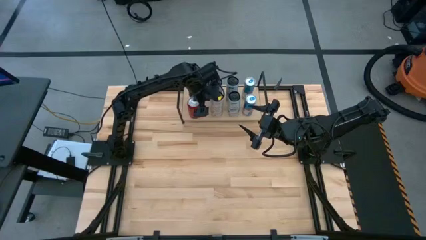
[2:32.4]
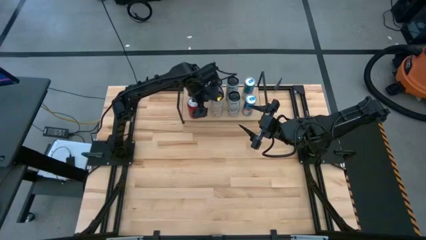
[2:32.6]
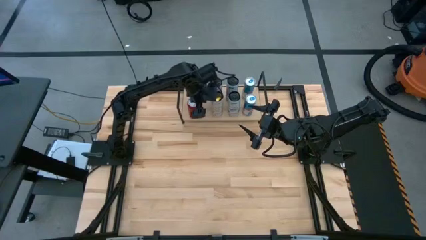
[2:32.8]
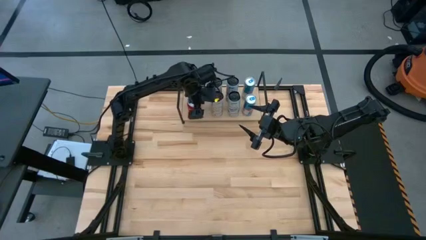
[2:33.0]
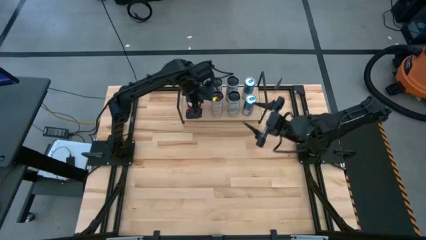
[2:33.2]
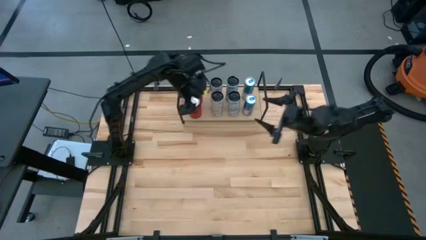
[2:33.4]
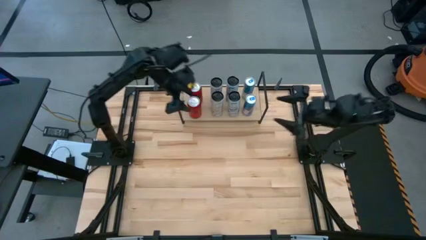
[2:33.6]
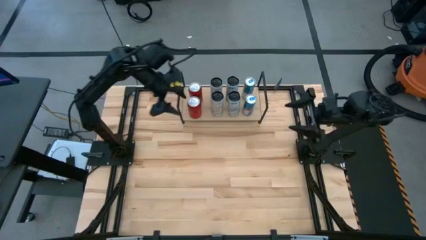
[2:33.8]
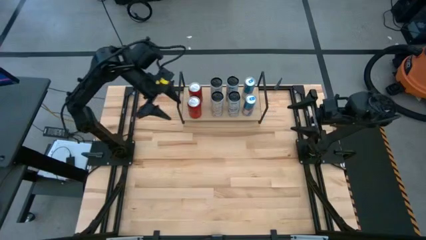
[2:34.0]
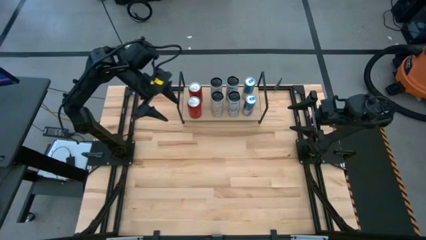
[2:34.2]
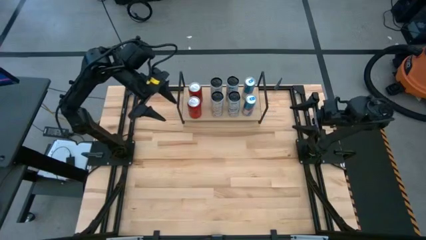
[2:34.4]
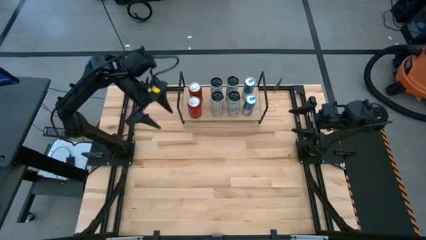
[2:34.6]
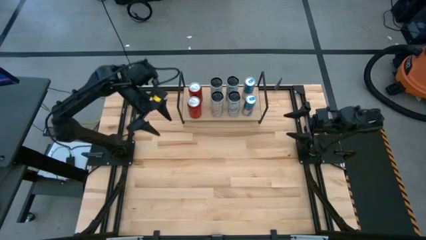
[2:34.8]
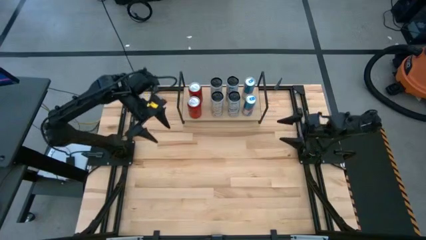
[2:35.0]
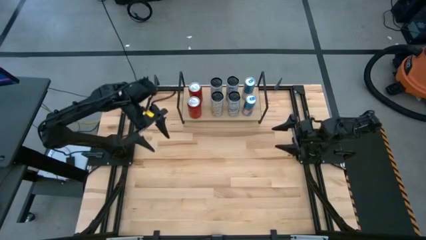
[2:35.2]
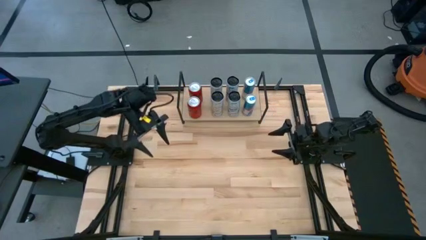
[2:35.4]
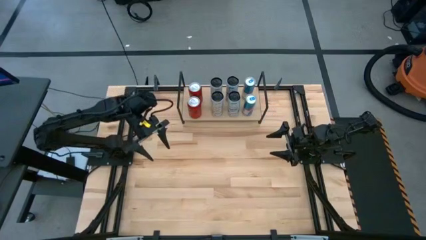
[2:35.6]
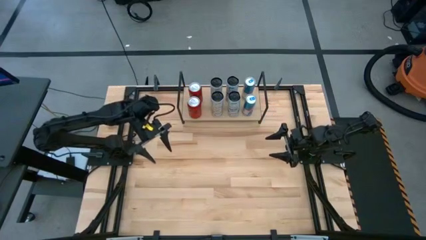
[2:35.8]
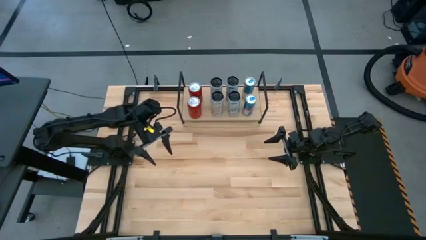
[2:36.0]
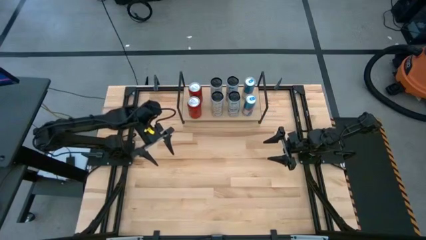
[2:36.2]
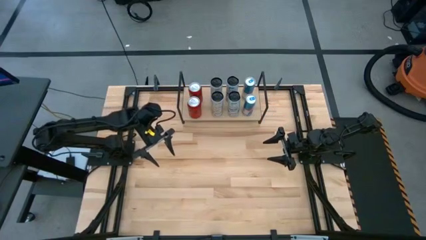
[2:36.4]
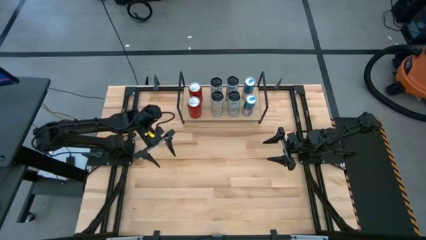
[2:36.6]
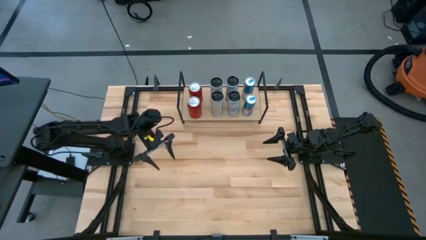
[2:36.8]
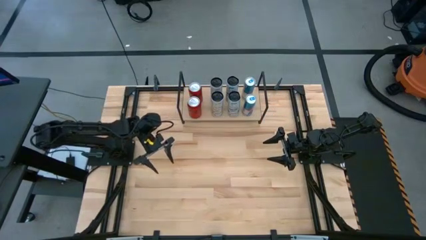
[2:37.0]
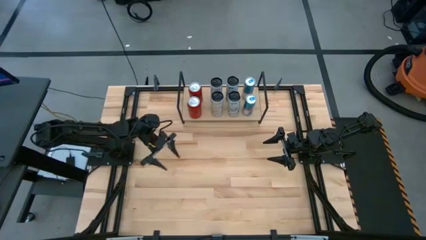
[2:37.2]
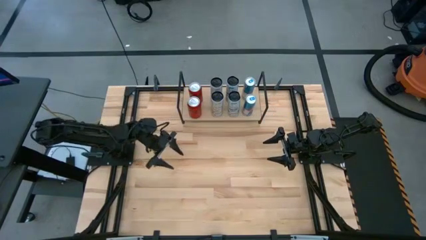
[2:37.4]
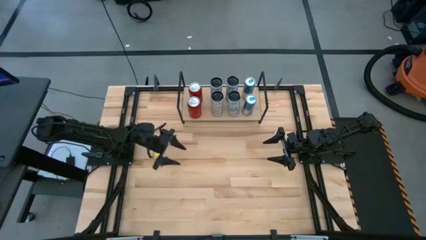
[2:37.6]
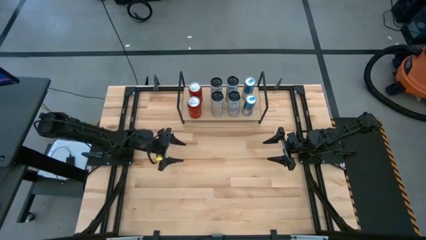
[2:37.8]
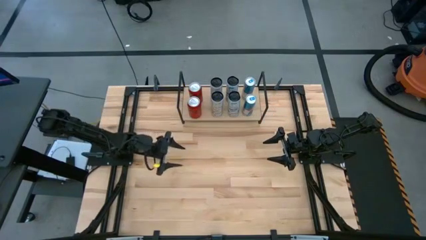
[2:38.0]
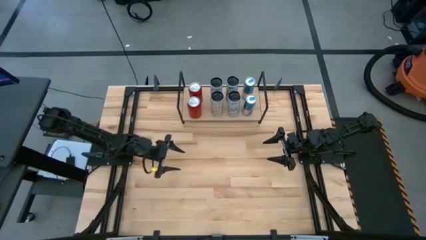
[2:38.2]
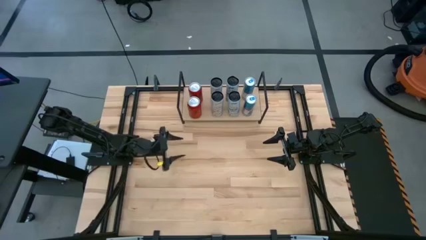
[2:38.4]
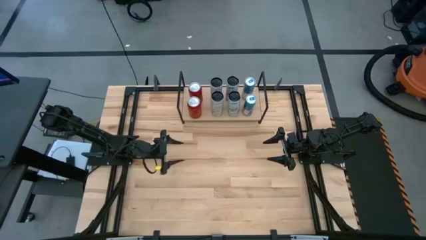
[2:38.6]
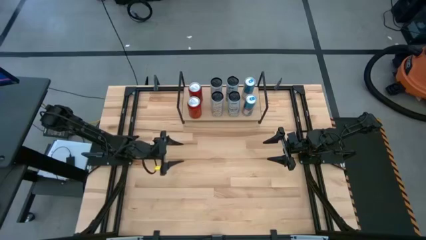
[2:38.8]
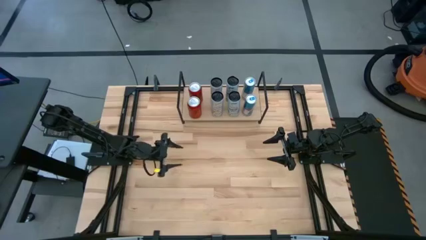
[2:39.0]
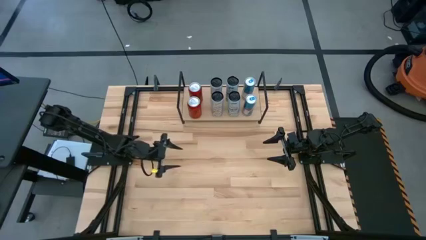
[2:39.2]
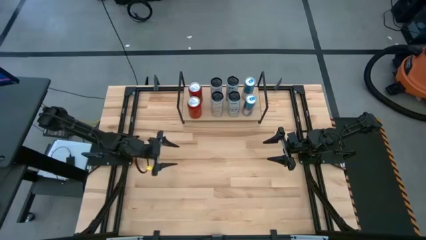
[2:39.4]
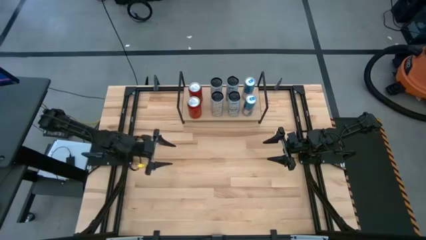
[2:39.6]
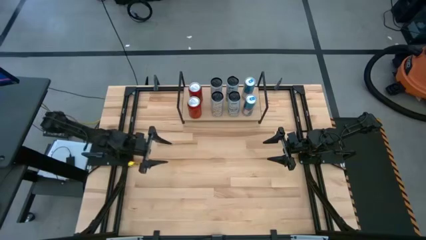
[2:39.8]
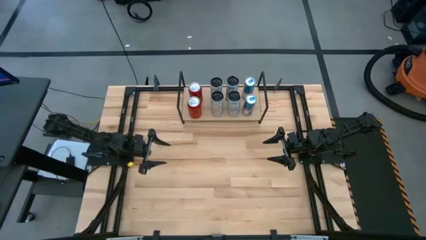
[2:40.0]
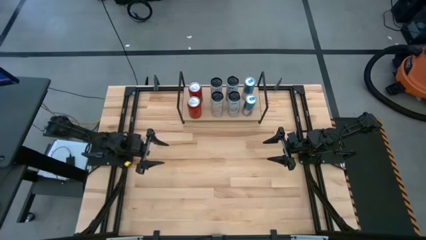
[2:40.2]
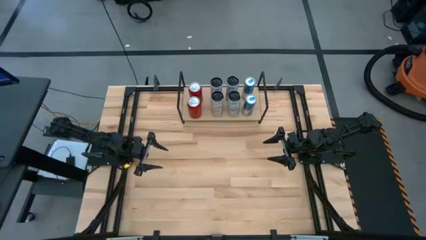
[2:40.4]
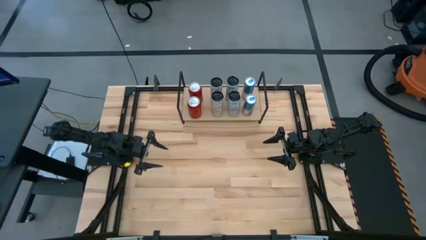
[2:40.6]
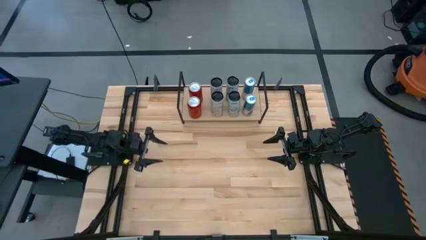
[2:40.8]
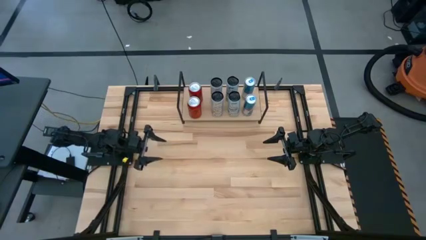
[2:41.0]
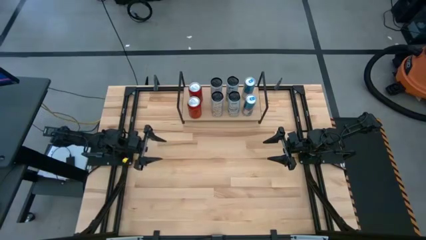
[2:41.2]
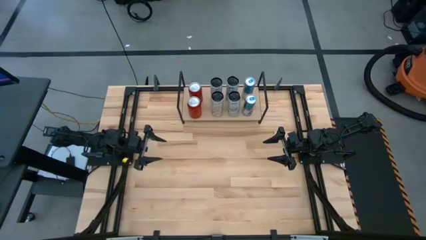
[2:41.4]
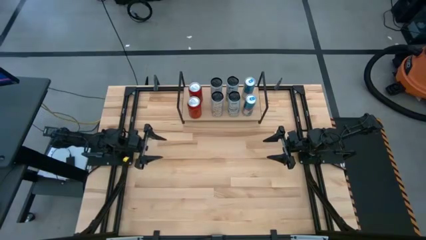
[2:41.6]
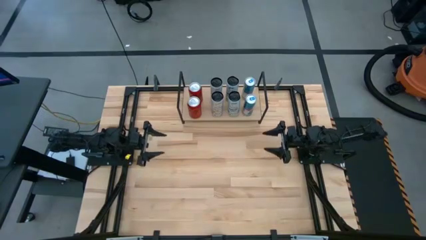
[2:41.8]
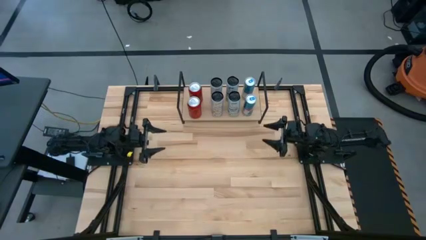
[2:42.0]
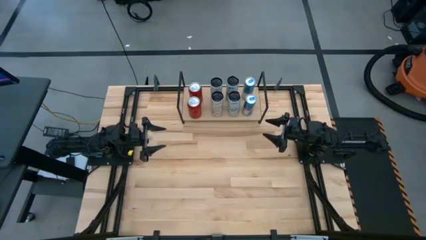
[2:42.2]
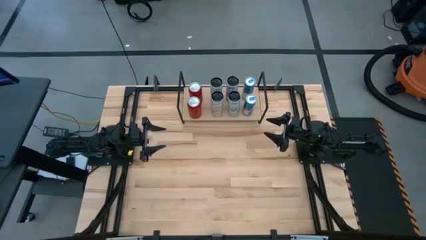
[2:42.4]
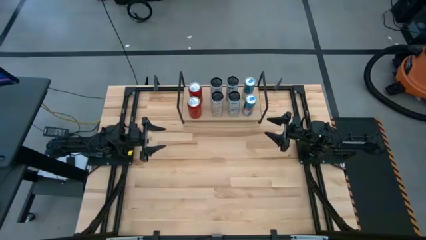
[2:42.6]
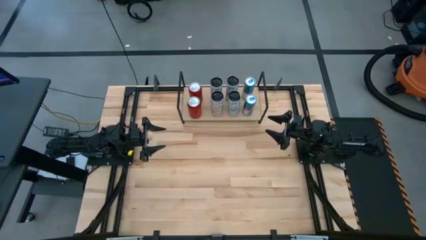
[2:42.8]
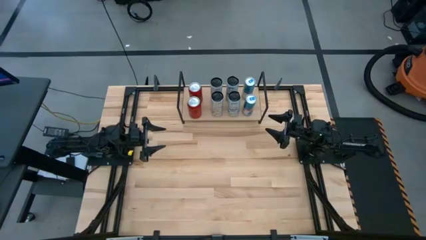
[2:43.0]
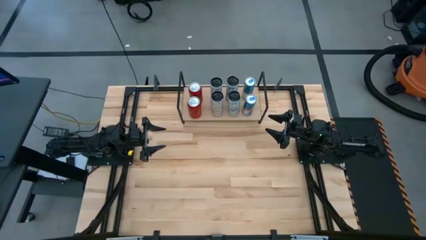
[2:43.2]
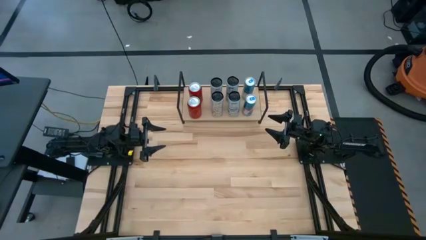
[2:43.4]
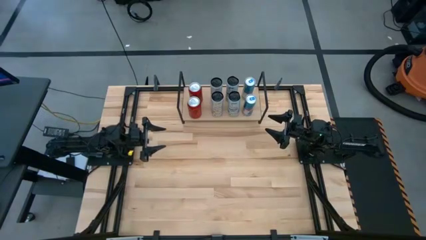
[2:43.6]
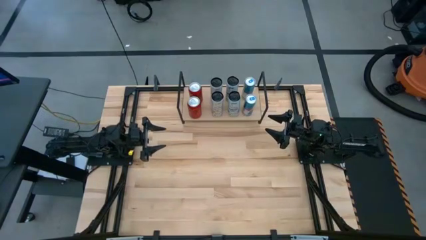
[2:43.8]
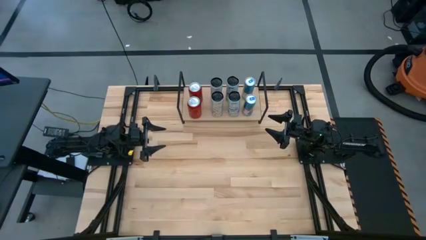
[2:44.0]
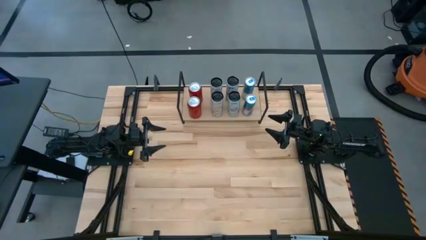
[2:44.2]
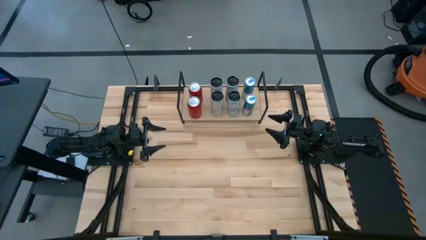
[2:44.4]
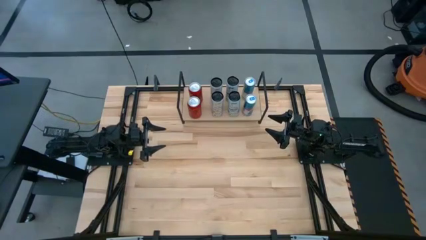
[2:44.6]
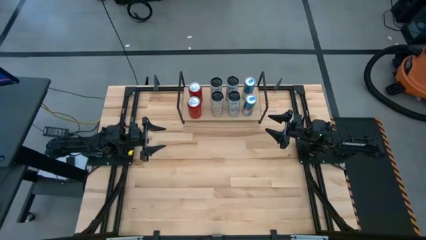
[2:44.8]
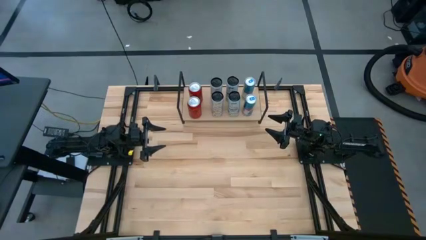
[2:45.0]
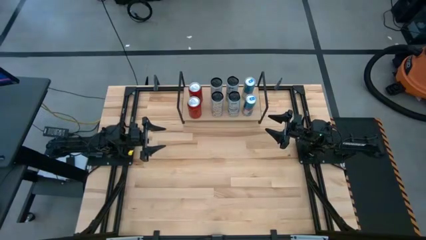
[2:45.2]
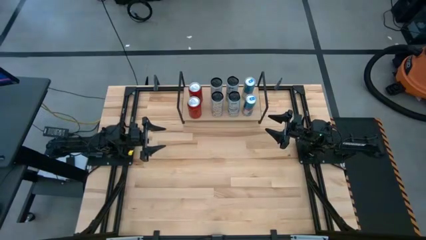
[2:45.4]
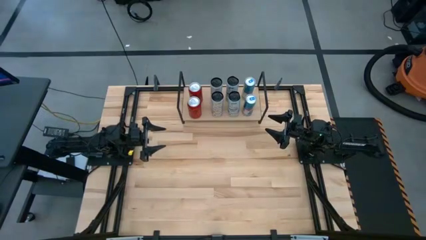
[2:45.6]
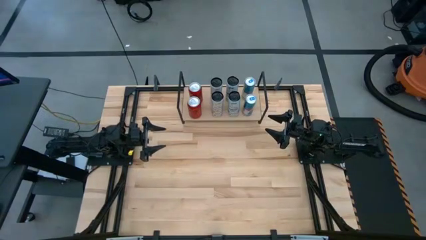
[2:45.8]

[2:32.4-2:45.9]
Task: Place canned beverage on shelf
Return to Home Position

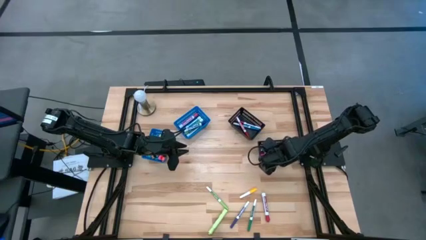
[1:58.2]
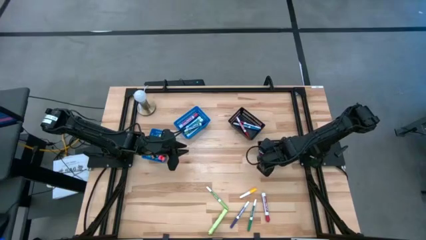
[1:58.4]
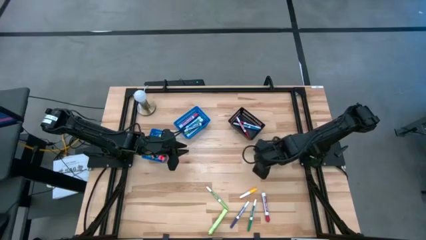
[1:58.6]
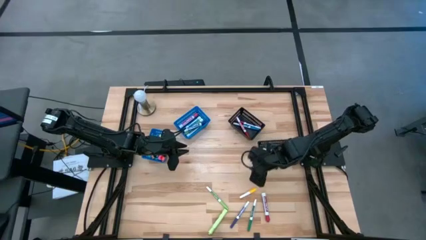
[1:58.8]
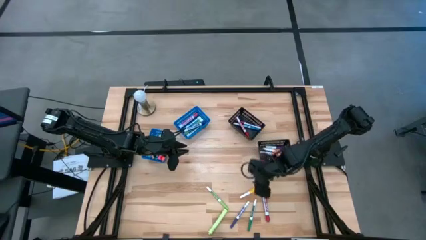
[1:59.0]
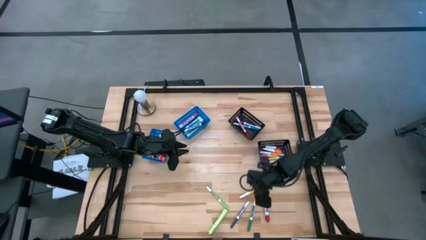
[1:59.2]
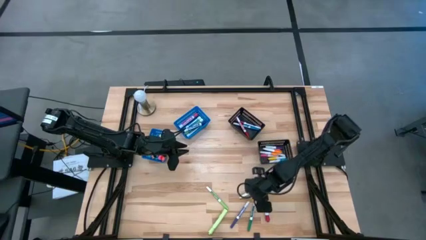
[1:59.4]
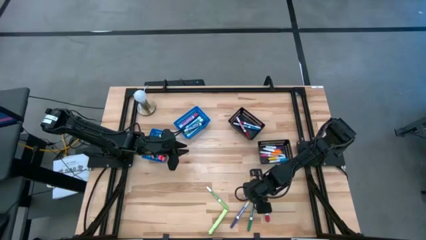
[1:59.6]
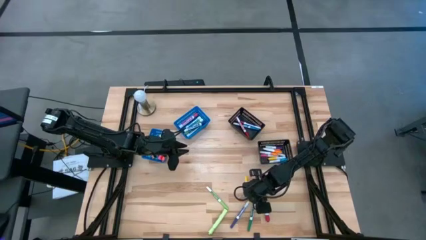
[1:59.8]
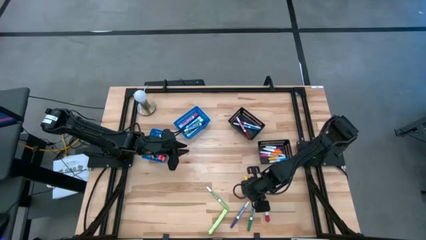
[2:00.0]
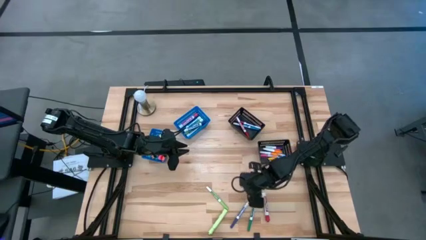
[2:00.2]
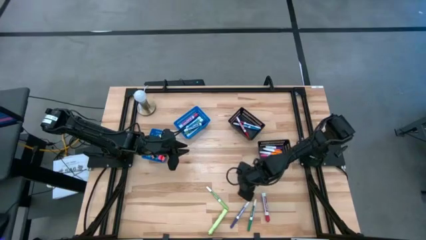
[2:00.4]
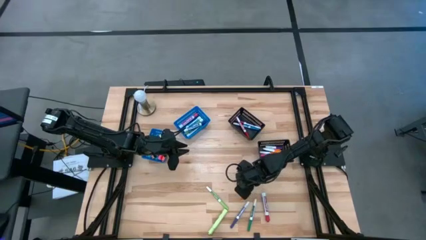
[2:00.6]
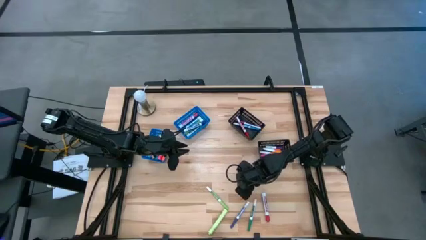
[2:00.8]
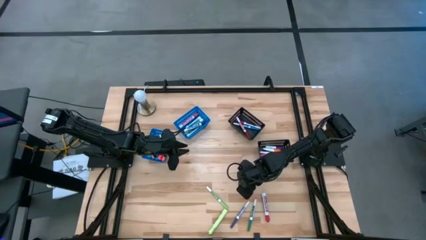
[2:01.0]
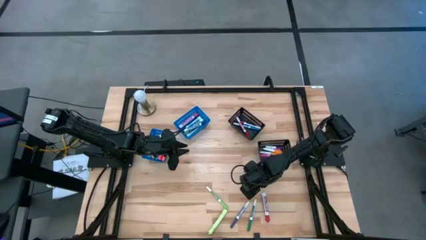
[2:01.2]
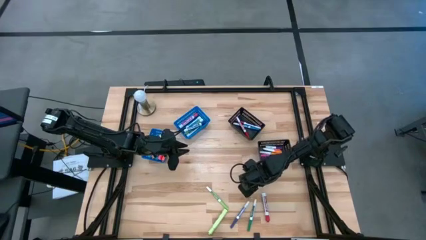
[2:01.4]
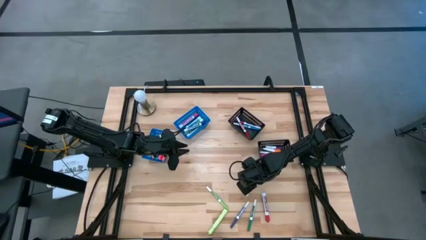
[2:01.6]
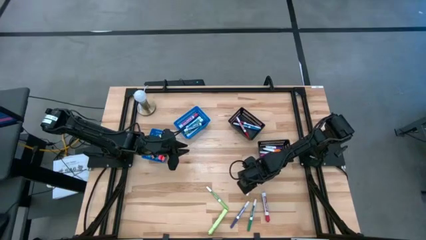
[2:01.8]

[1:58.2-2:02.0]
Task: Pick & Place Markers
Put the yellow highlighter pen into the left blue bin

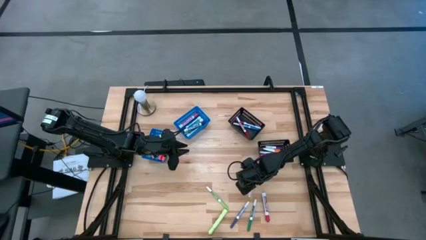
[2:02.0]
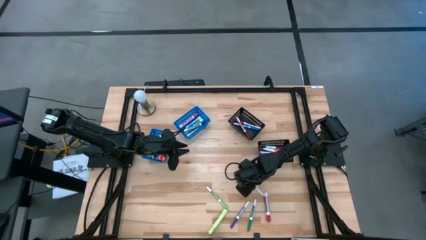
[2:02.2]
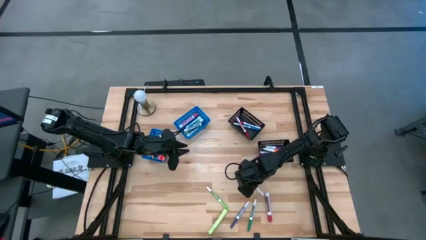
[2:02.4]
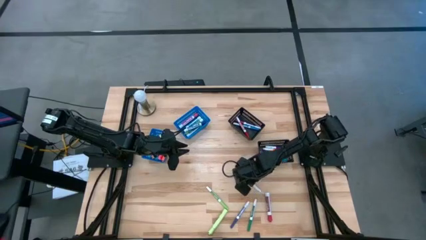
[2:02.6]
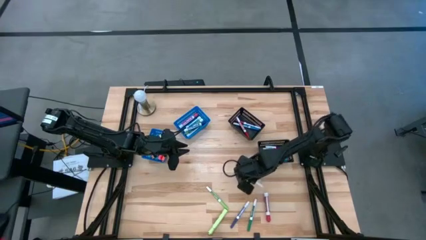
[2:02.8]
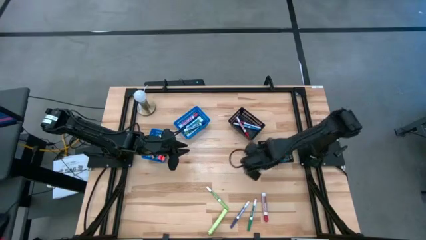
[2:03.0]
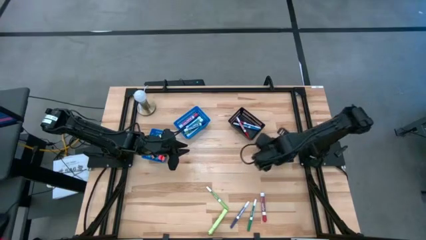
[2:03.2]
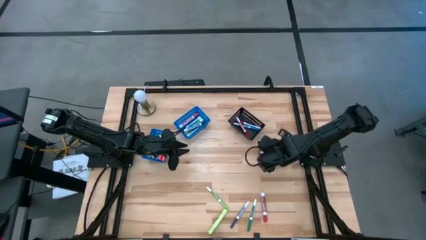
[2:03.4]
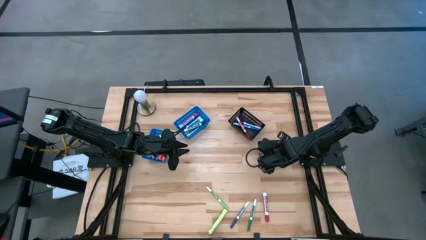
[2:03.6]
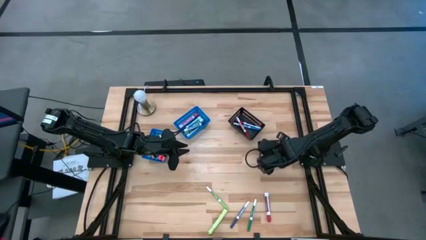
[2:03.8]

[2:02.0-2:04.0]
Put the yellow highlighter pen into the left blue bin
